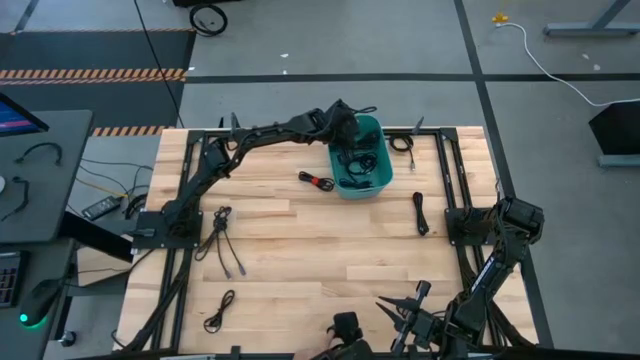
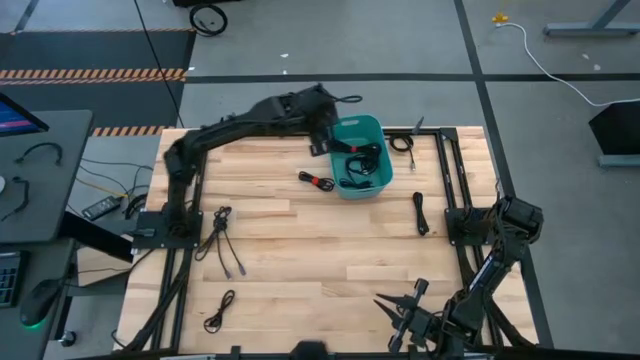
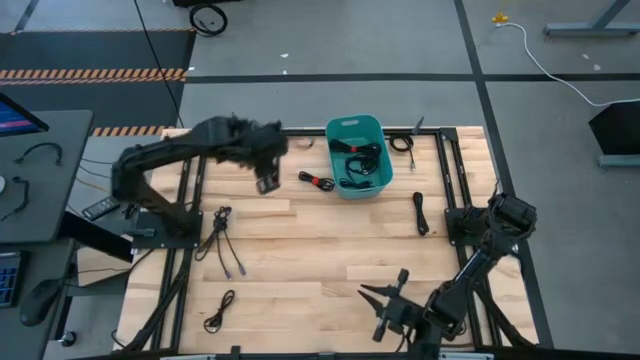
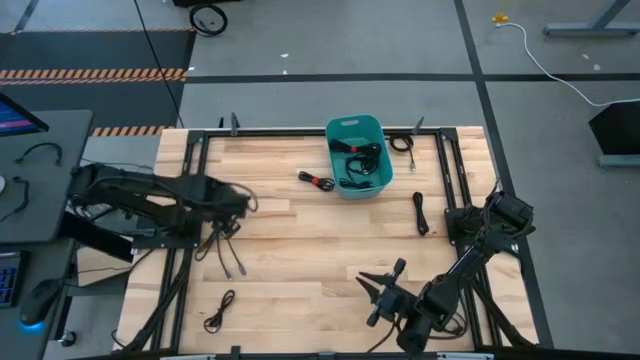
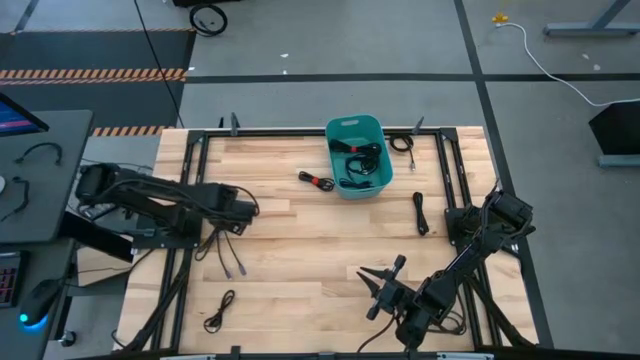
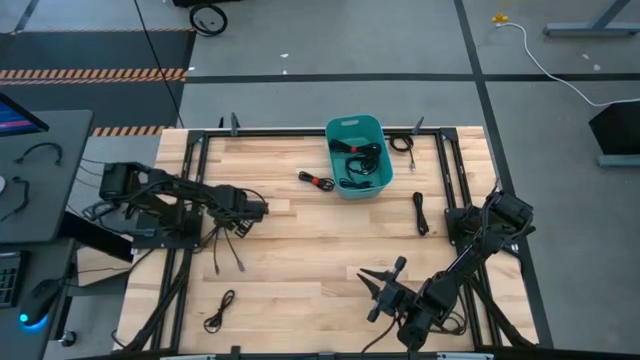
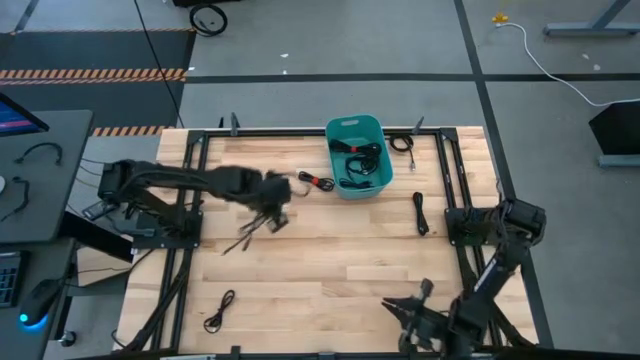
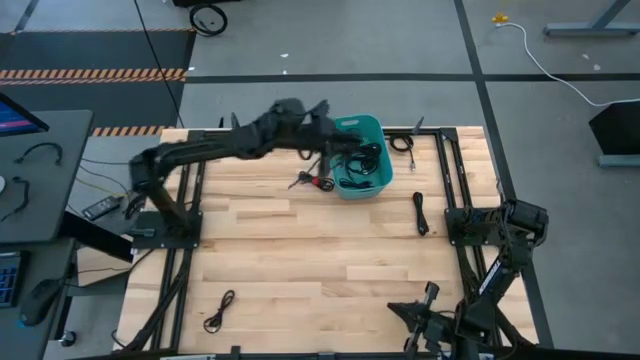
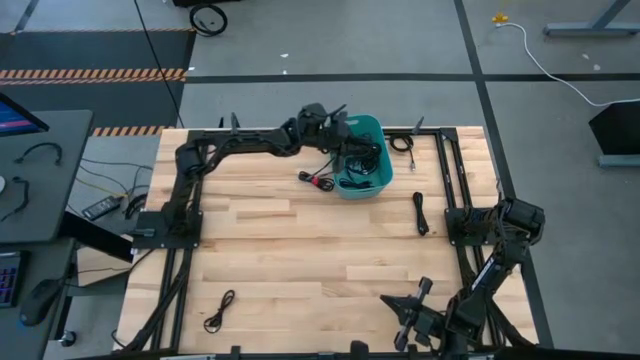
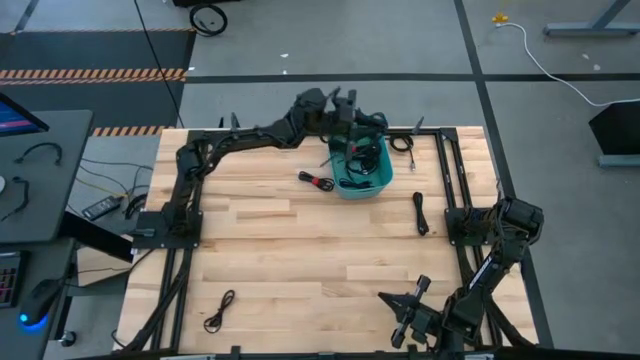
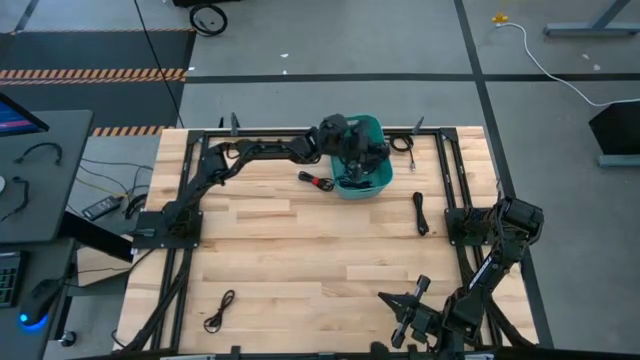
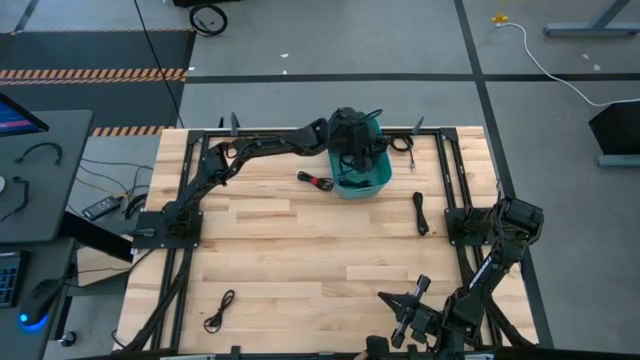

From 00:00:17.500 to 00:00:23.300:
Task: Pick and place USB-C Cables
Put the black charger cable into the green bin

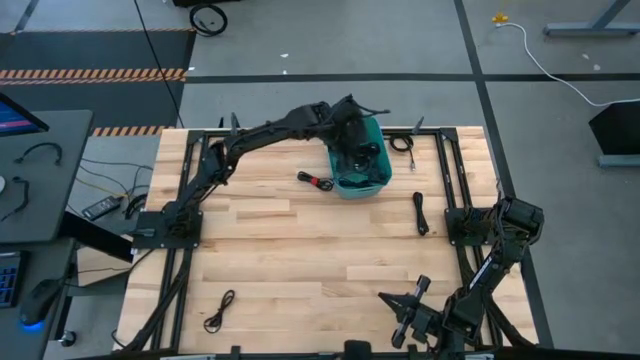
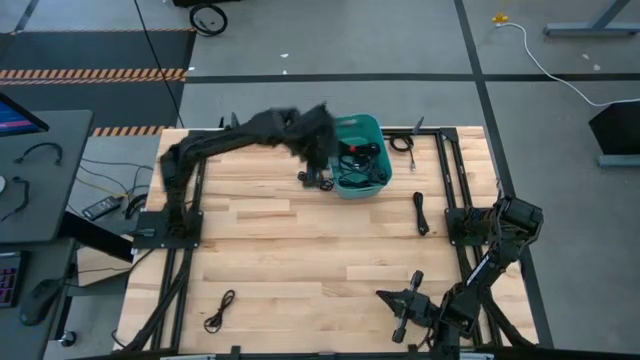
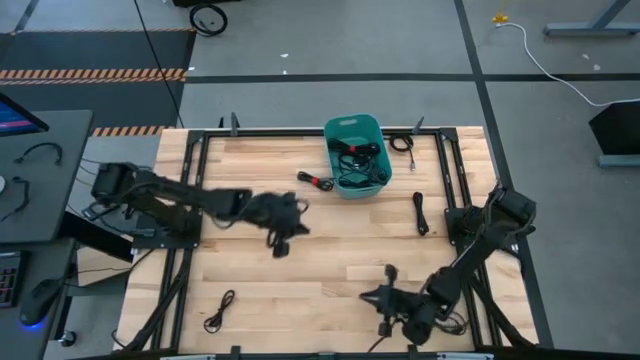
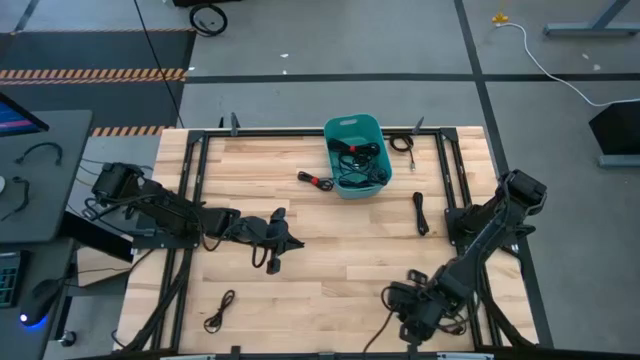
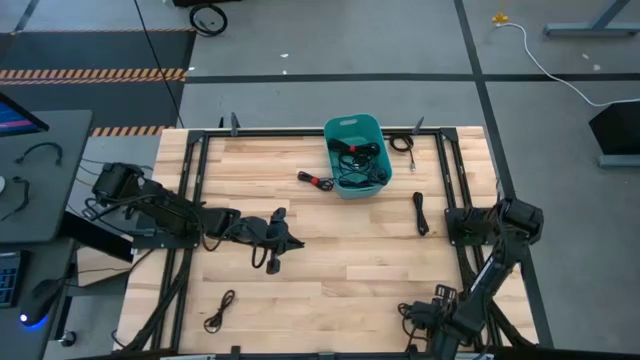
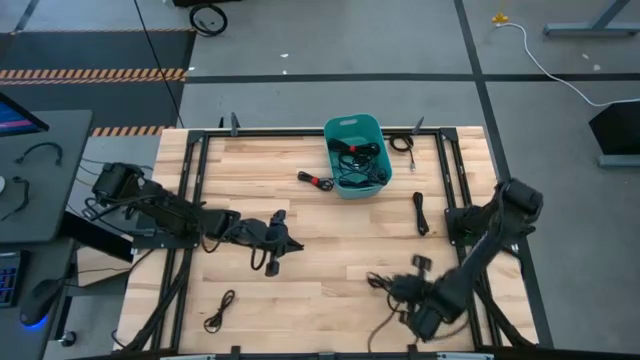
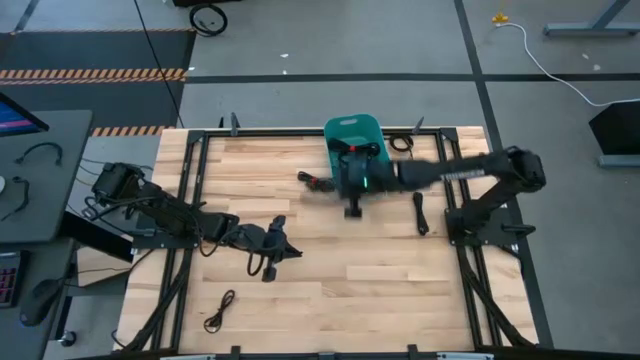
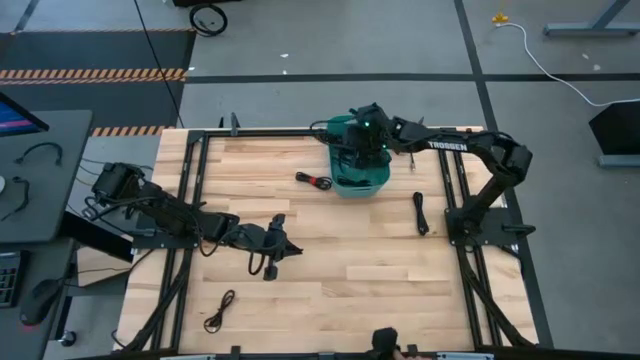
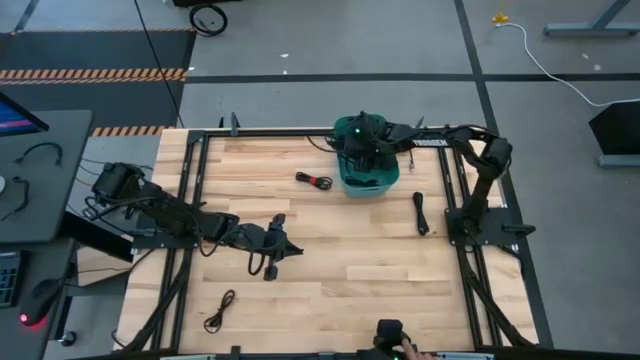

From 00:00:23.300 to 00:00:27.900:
Put the black charger cable into the green bin

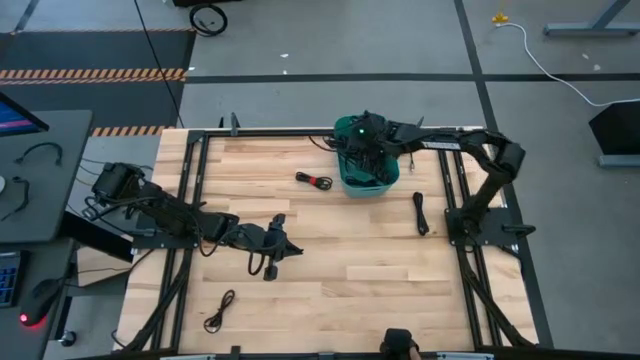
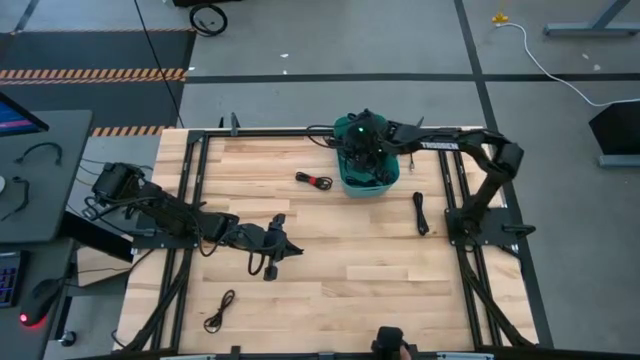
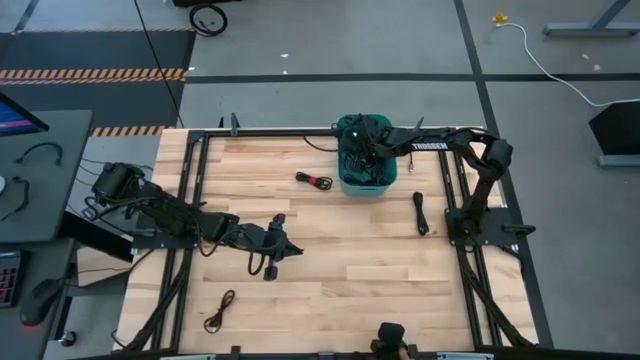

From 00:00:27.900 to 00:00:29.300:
Put the black charger cable into the green bin

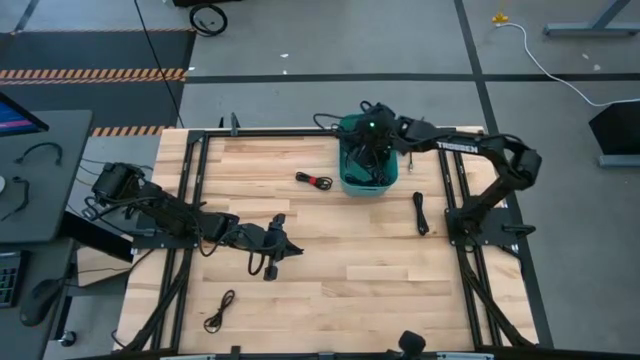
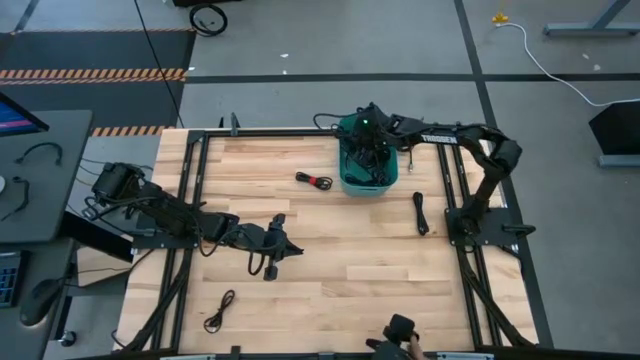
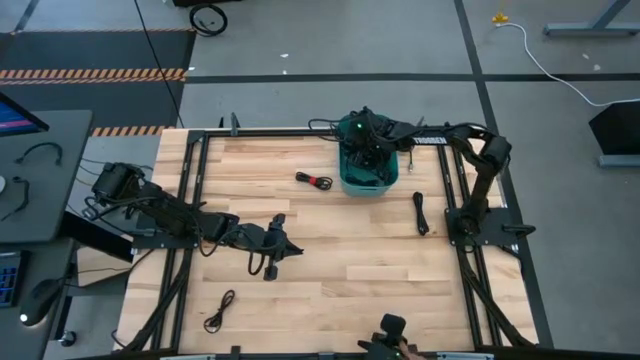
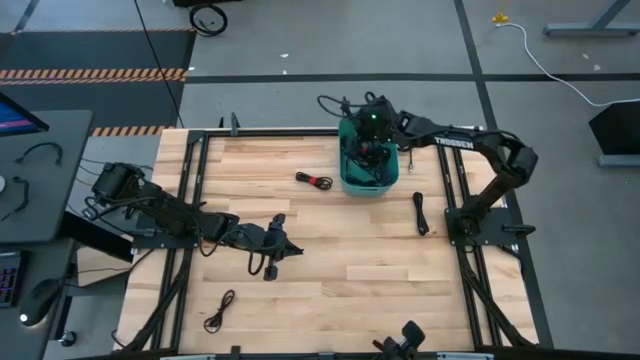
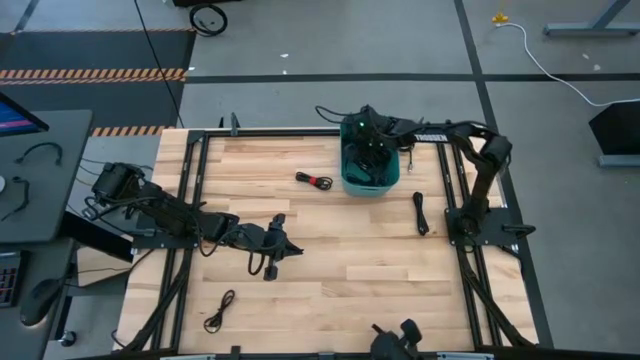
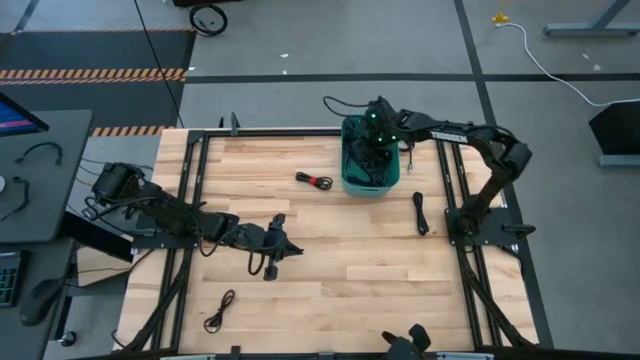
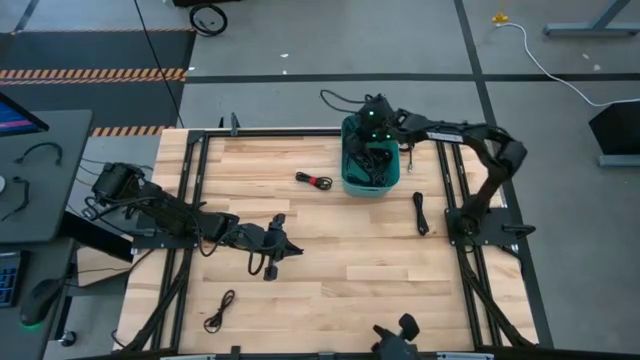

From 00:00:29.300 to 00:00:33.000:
Put the black charger cable into the green bin

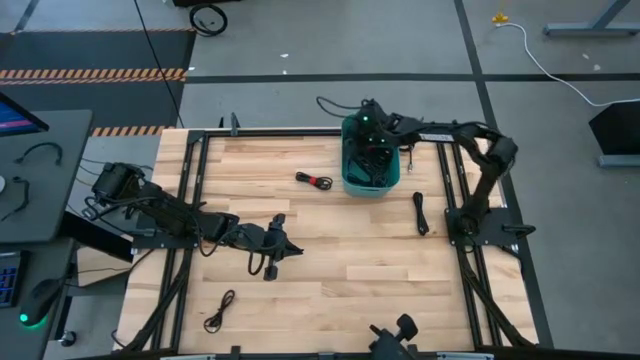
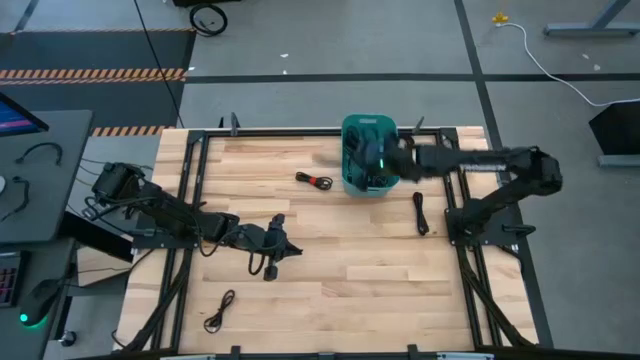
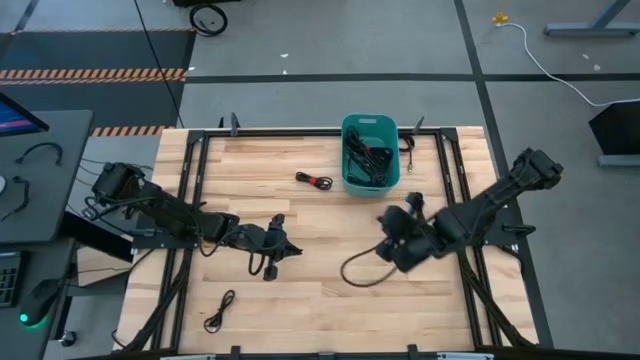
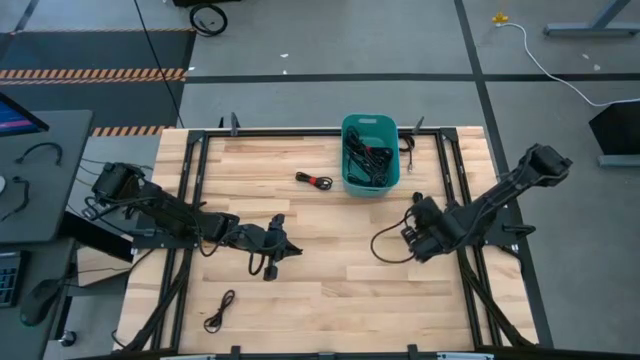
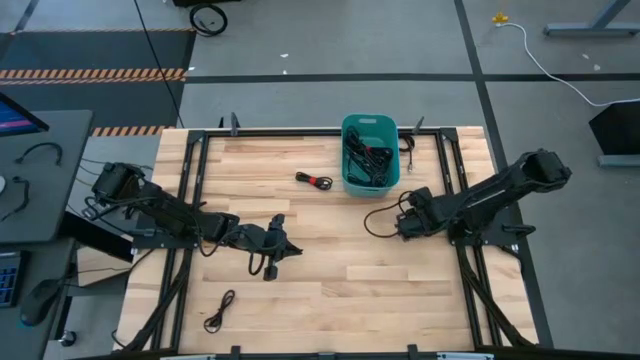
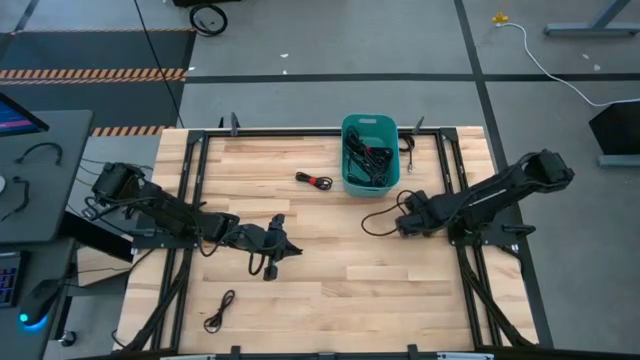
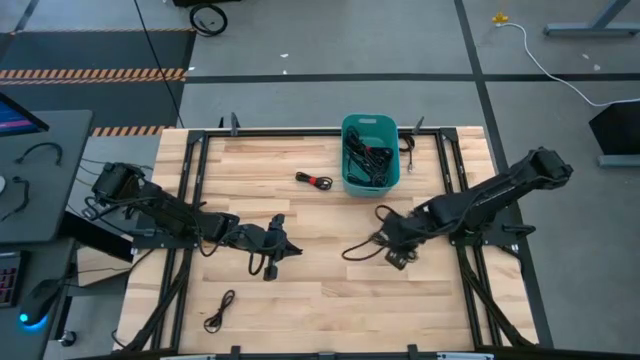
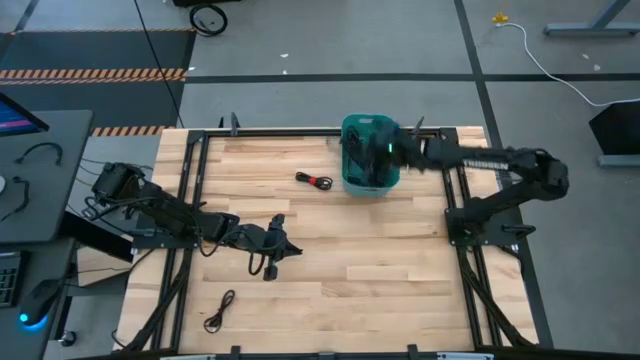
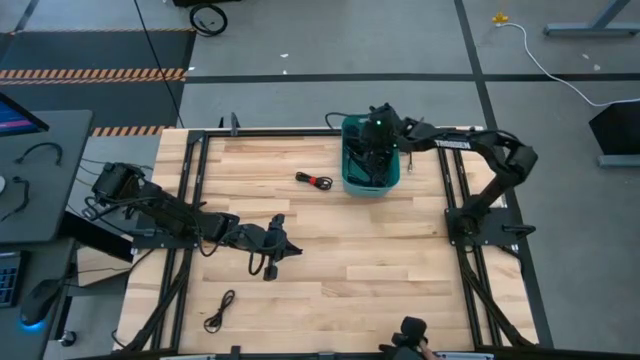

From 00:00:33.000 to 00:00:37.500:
Put the black charger cable into the green bin

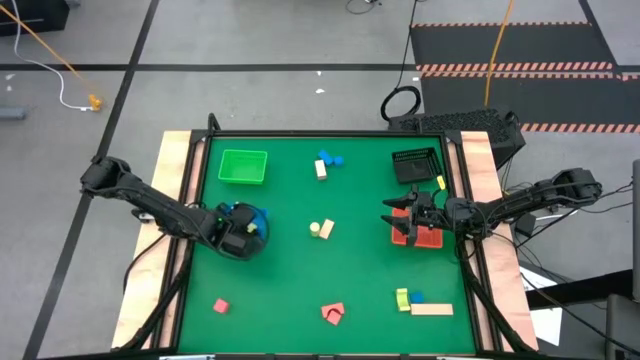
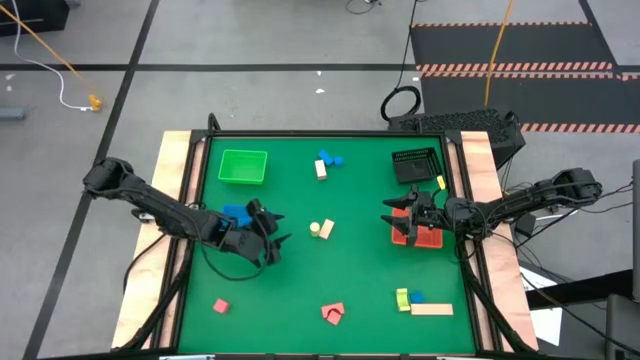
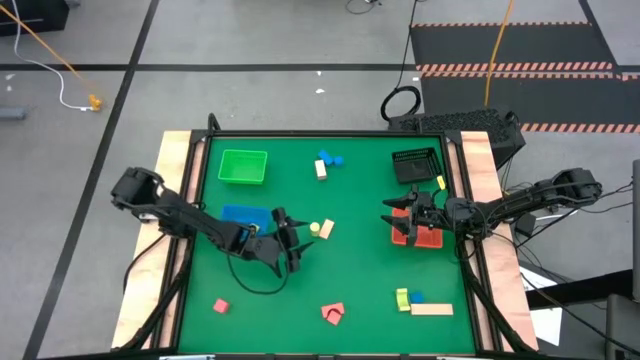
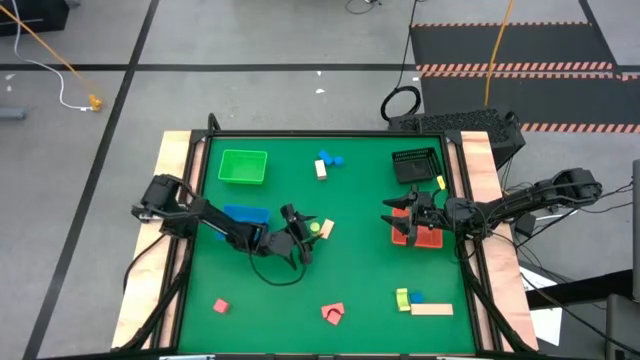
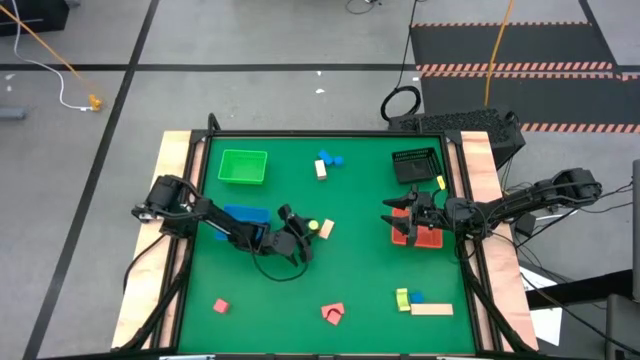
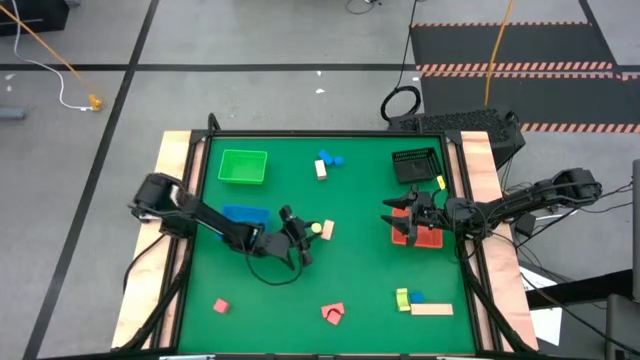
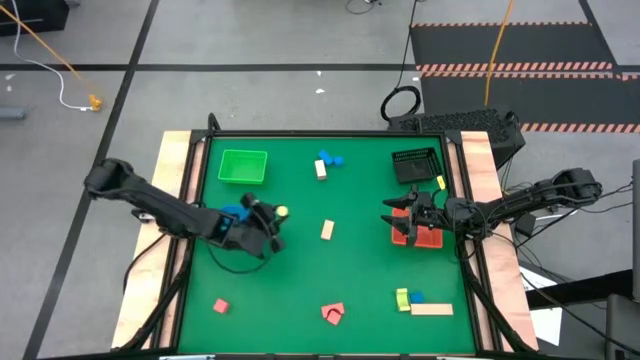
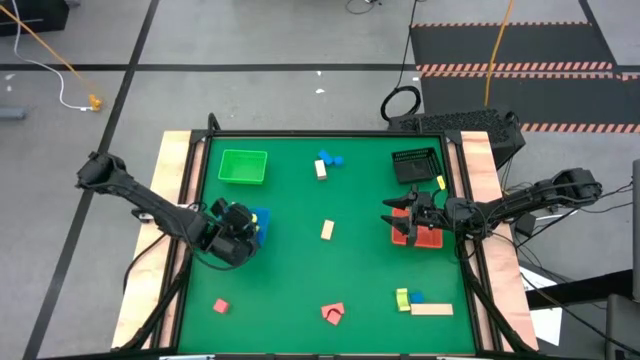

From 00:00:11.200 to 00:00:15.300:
Task: Sort & place blocks by color
Put the top green block into the blue bin
